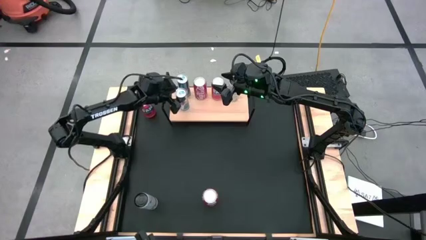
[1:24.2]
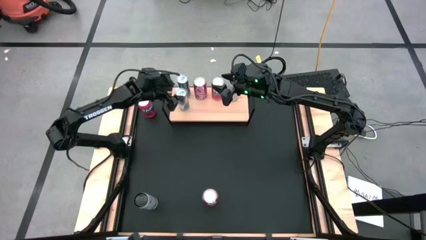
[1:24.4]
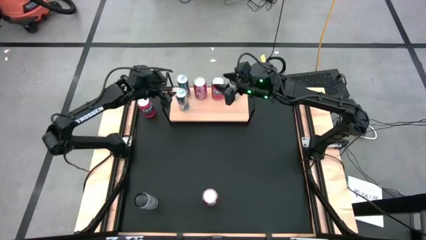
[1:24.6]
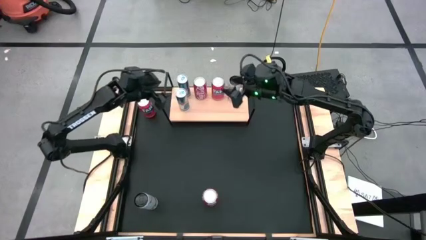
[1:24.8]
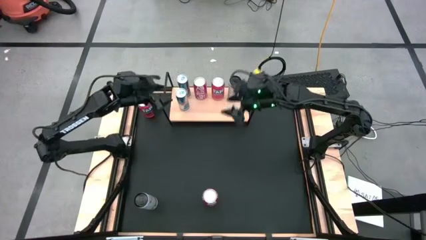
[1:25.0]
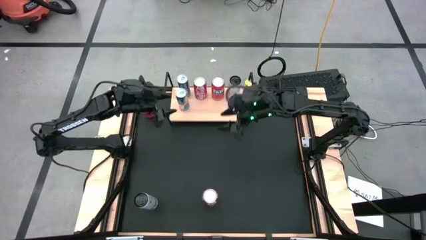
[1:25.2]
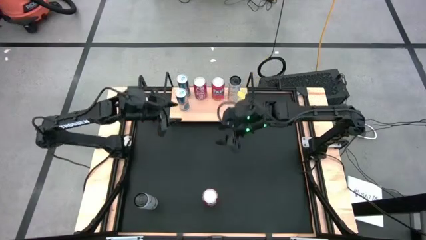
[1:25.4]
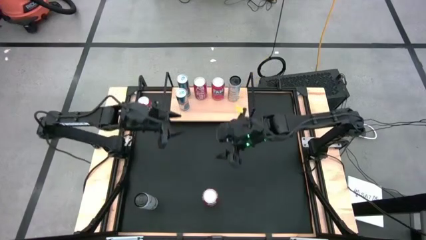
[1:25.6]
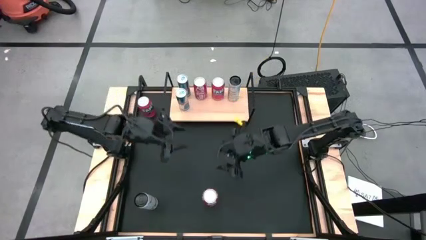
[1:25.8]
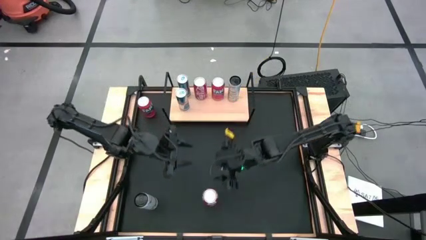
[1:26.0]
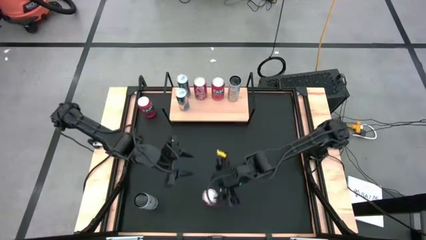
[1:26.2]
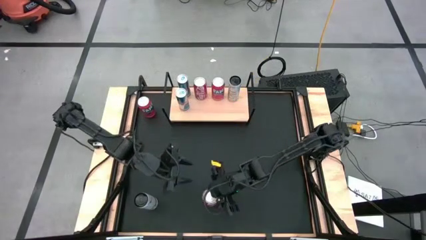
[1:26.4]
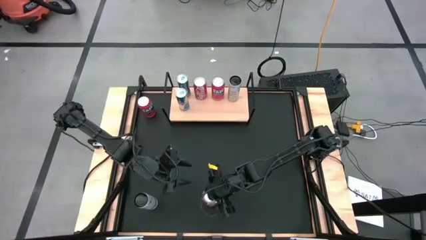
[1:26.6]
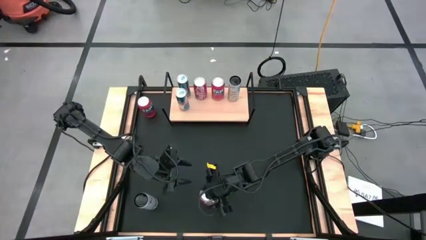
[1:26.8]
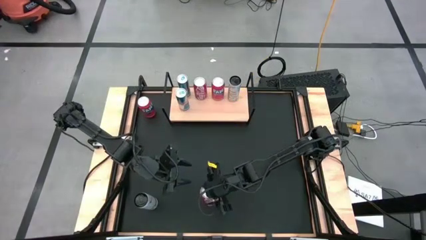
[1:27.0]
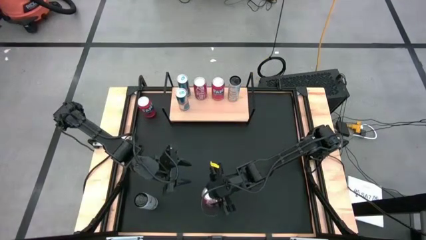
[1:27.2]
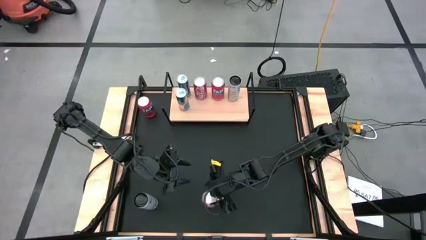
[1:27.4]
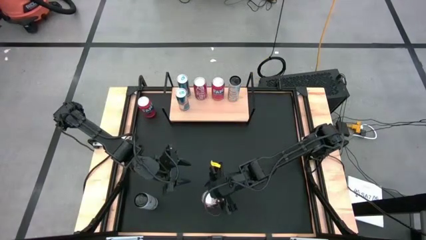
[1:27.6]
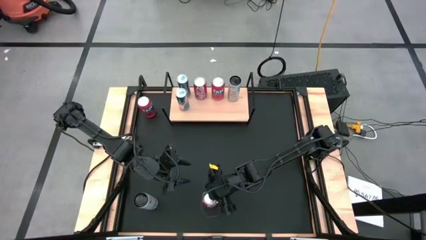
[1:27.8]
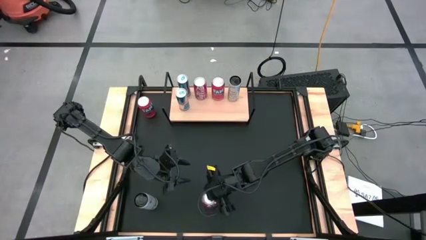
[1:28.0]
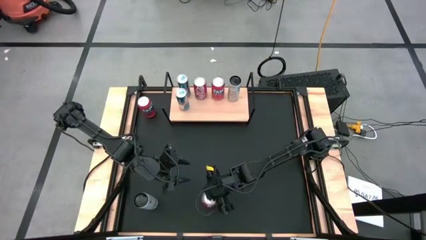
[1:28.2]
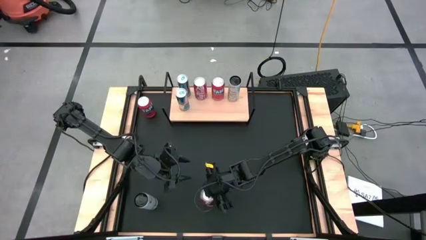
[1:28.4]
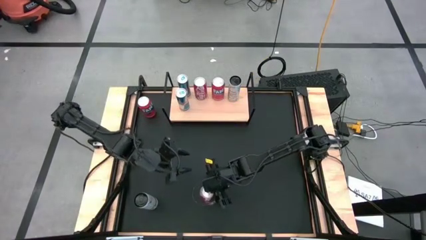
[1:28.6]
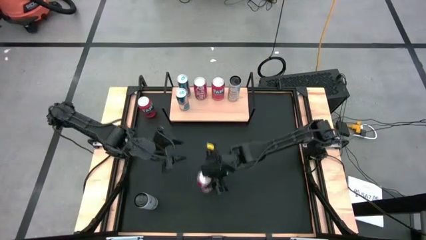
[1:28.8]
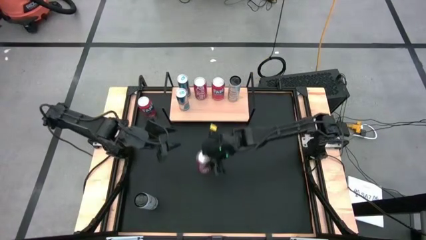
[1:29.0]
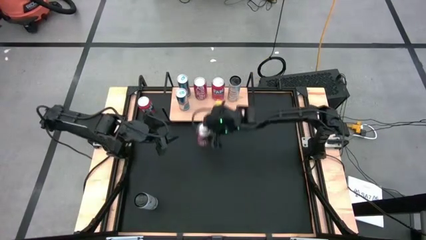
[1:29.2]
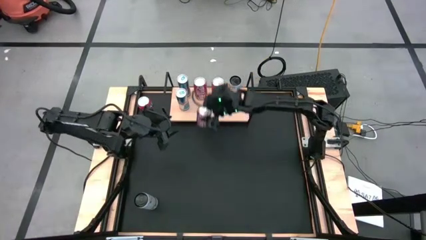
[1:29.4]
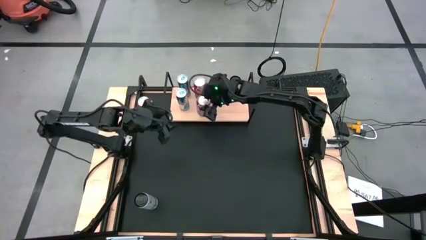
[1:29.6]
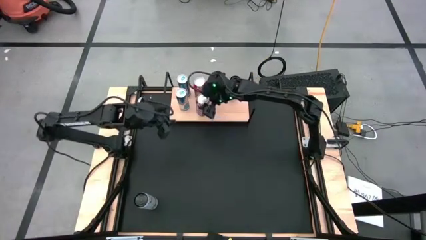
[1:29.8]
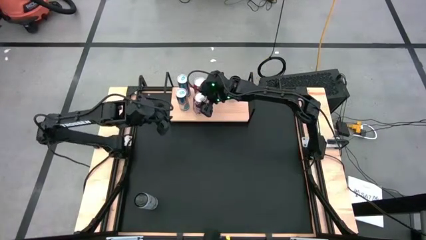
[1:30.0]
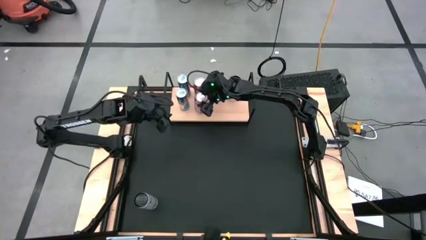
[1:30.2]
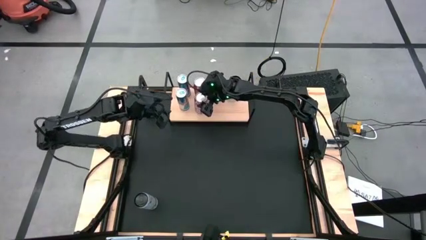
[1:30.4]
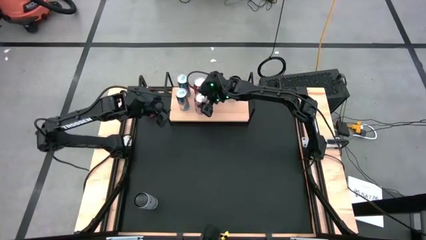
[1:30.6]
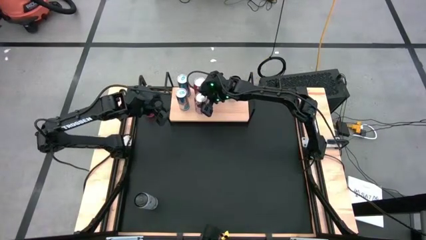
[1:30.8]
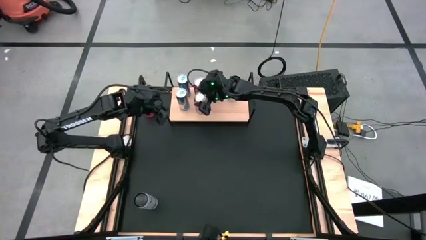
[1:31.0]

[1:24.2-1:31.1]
Task: Place canned beverage on shelf
Put the red-black soda can on the shelf aligned with the other red-black soda can on the shelf

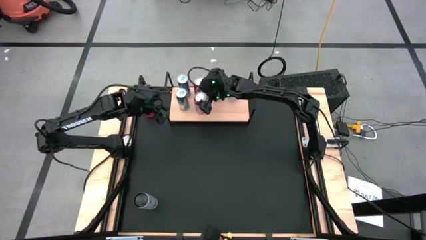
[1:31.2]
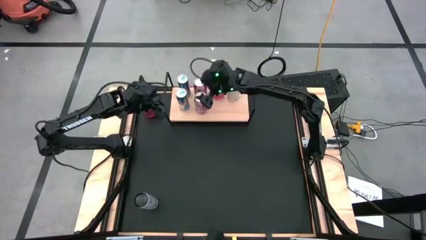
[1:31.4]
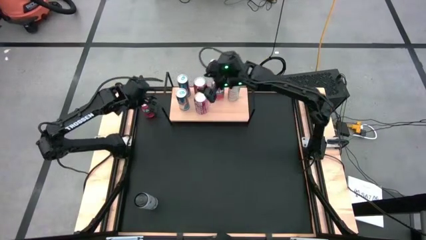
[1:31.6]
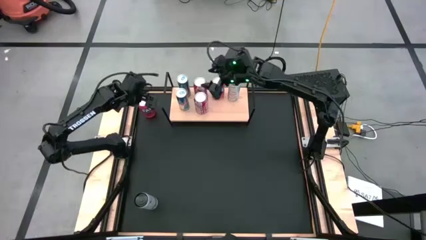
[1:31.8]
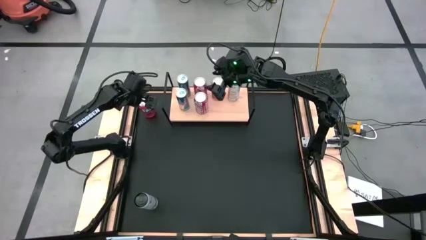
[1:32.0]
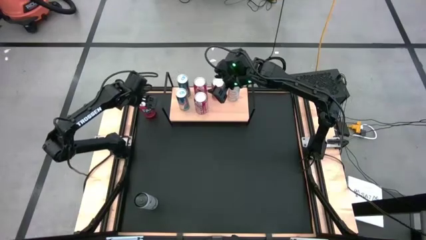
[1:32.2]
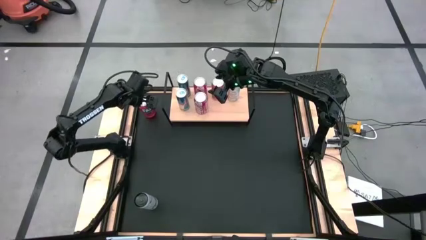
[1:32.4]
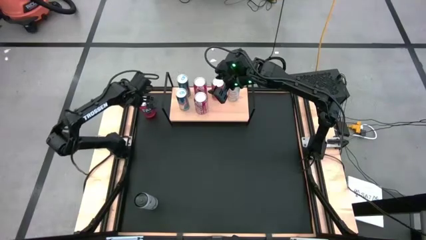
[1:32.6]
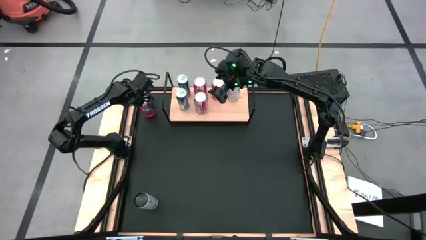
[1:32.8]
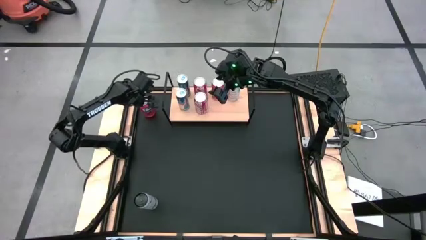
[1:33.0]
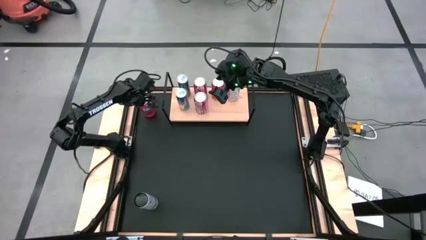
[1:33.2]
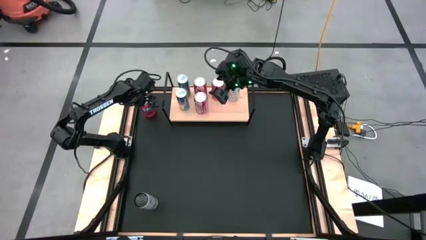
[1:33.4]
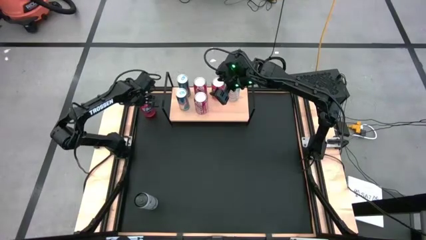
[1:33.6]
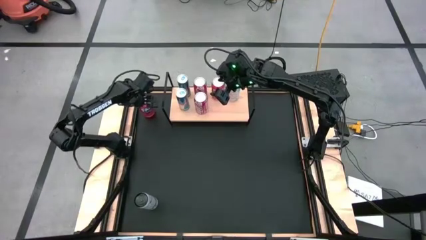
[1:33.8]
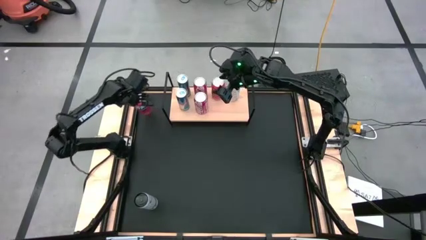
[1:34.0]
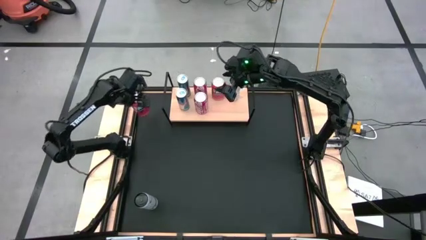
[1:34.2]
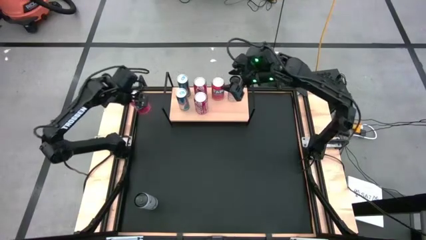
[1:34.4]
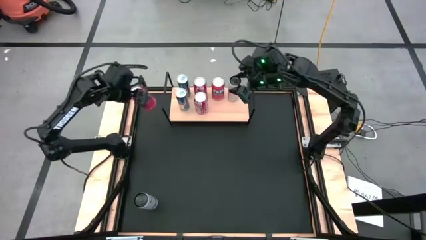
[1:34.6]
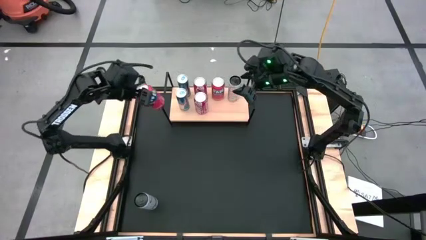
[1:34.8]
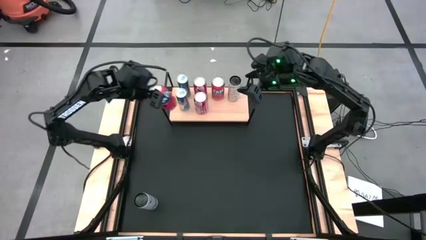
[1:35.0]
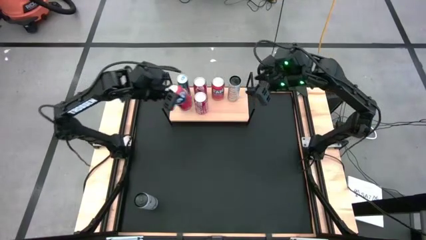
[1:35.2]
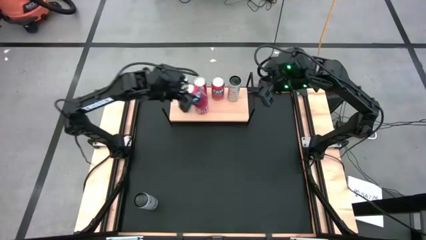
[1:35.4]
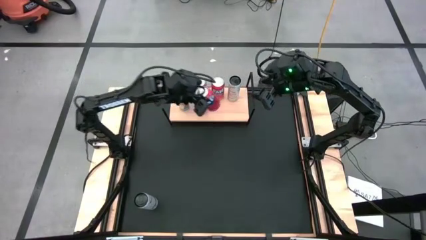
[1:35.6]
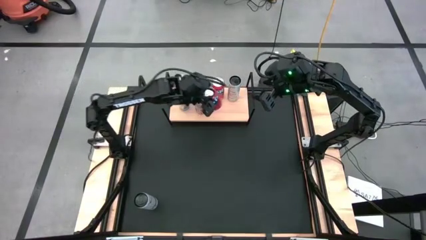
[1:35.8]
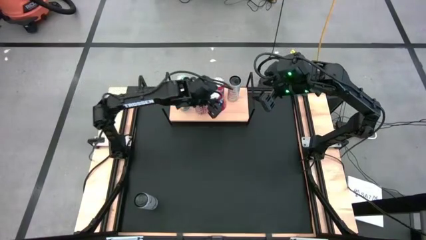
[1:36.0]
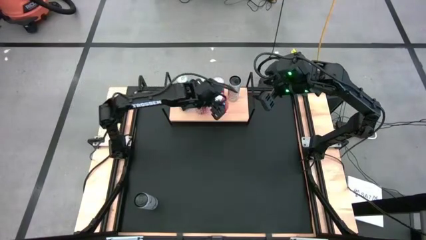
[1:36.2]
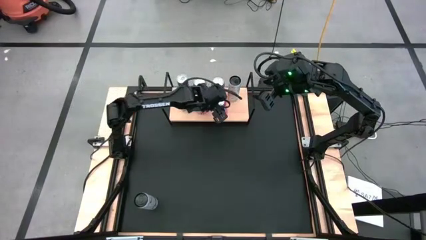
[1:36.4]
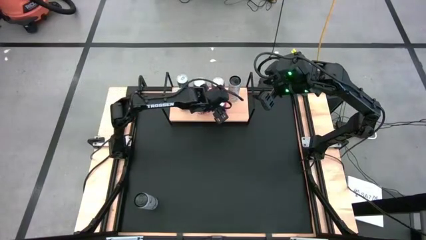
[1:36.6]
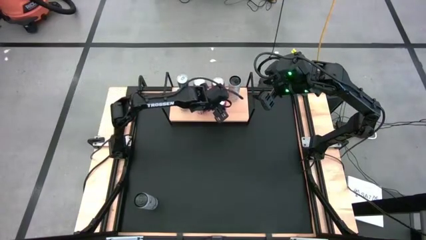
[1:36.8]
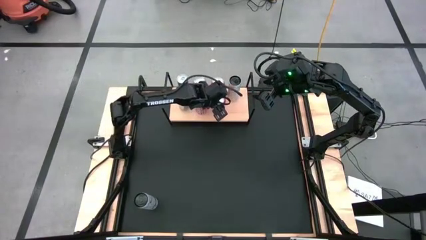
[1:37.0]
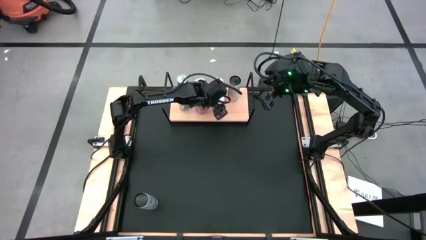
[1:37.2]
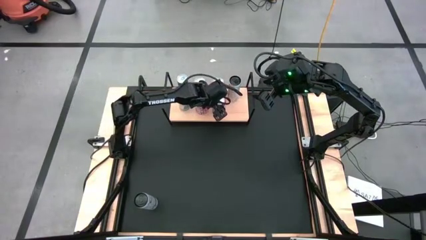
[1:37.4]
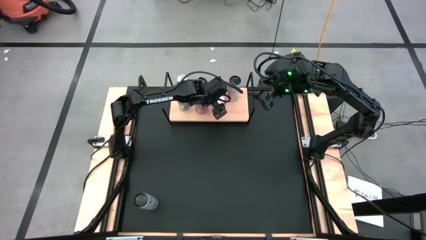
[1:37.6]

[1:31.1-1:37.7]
Put the red soda can on the shelf aligned with the other red soda can on the shelf
